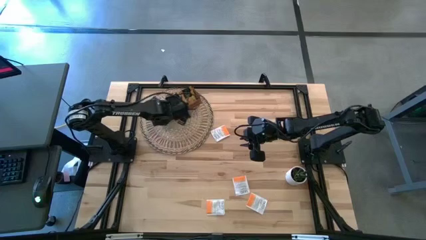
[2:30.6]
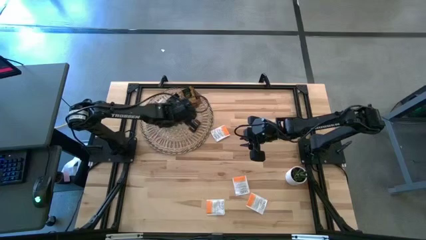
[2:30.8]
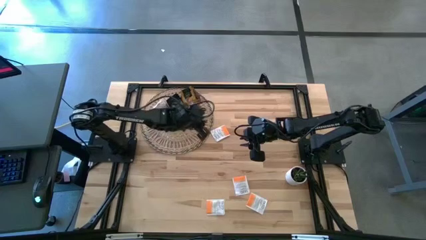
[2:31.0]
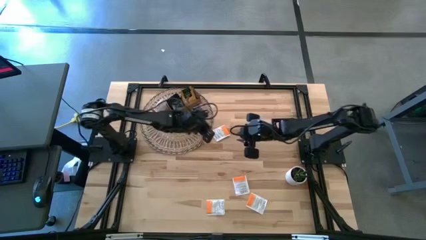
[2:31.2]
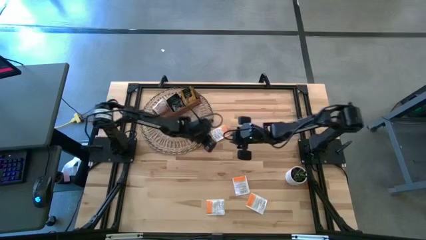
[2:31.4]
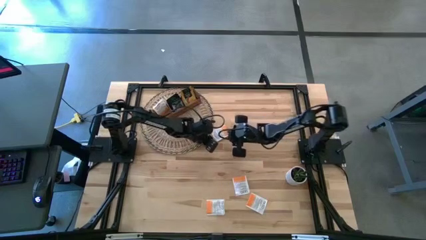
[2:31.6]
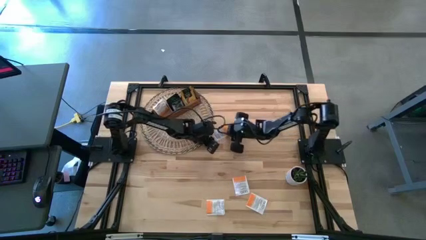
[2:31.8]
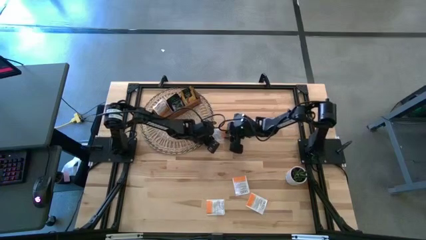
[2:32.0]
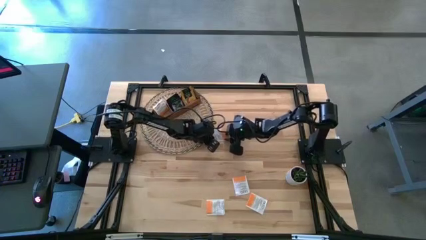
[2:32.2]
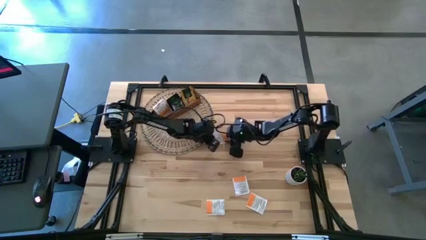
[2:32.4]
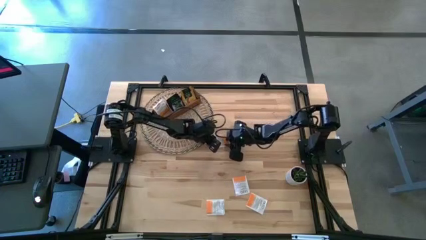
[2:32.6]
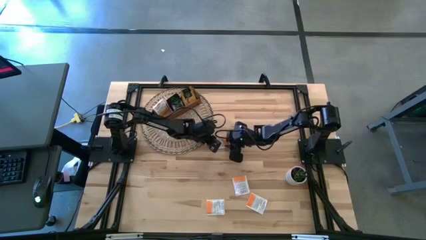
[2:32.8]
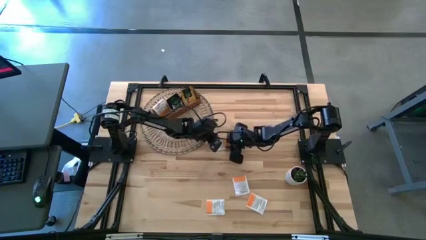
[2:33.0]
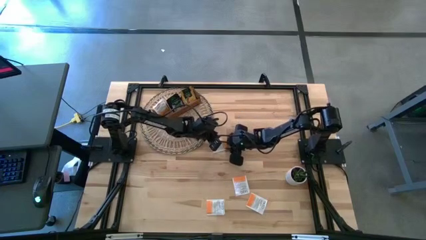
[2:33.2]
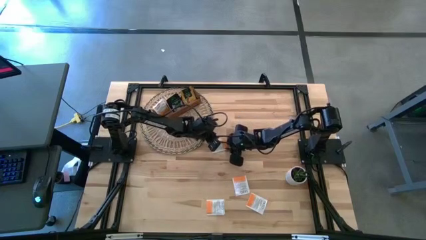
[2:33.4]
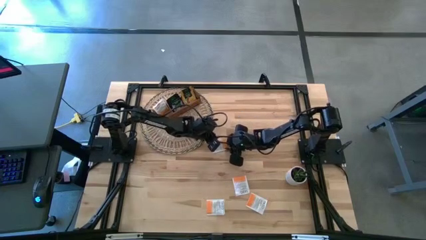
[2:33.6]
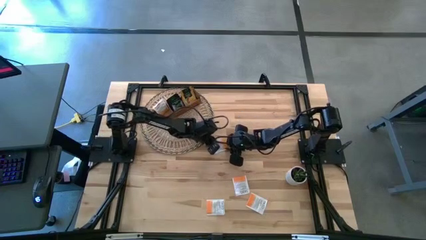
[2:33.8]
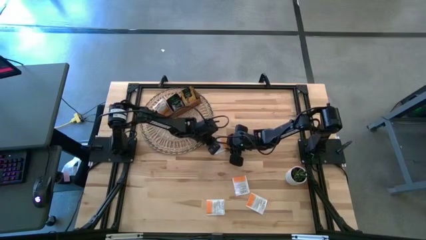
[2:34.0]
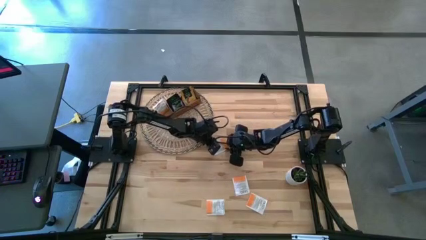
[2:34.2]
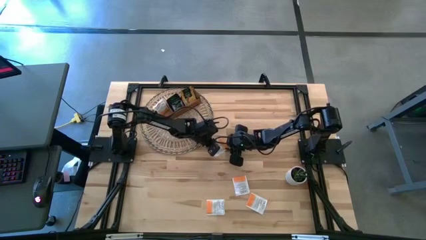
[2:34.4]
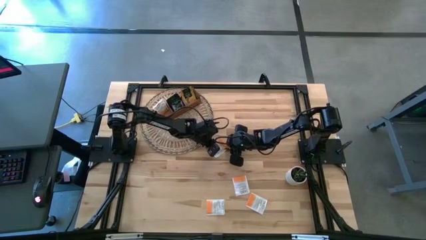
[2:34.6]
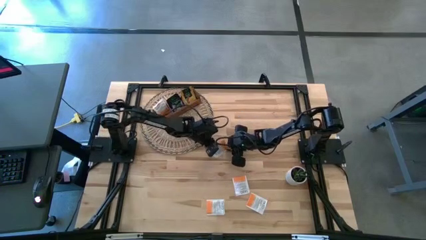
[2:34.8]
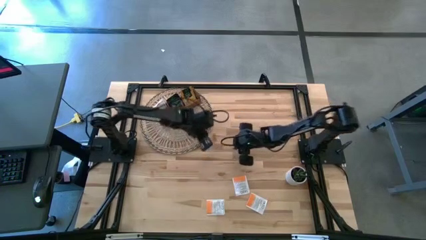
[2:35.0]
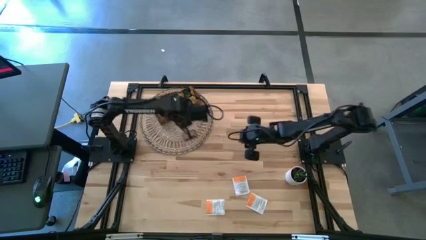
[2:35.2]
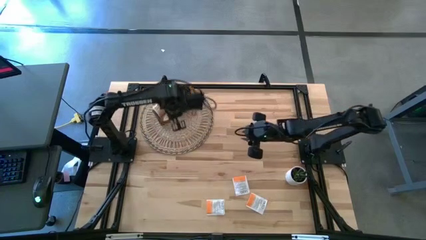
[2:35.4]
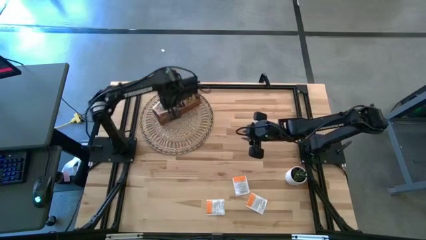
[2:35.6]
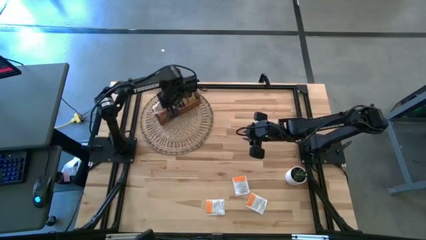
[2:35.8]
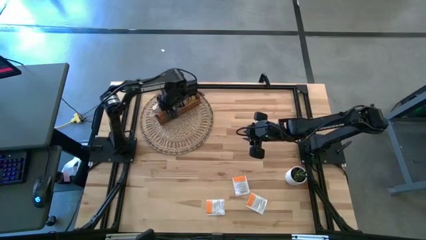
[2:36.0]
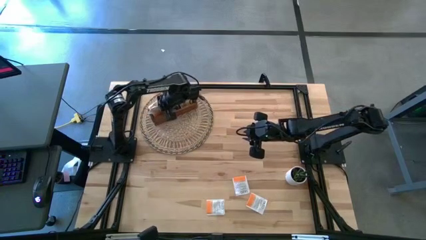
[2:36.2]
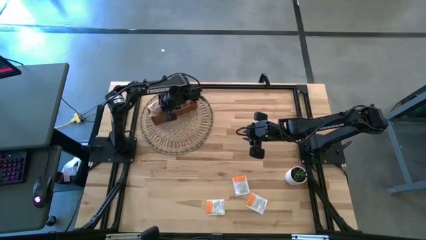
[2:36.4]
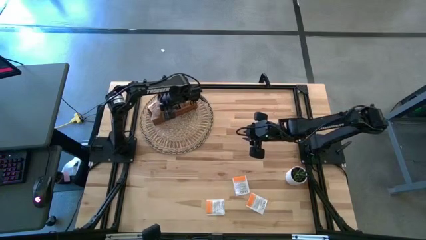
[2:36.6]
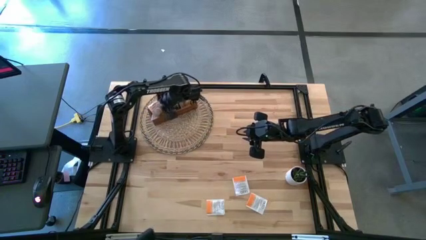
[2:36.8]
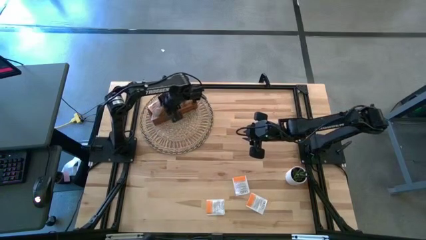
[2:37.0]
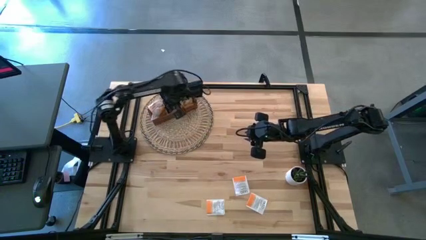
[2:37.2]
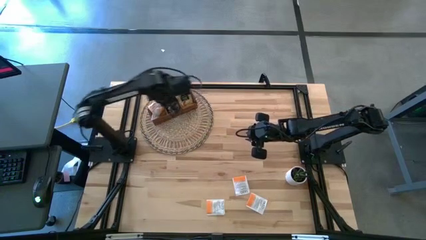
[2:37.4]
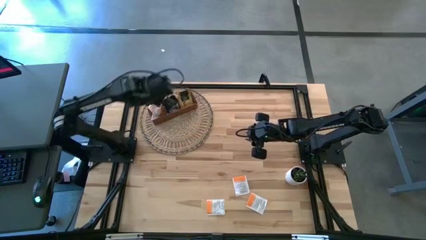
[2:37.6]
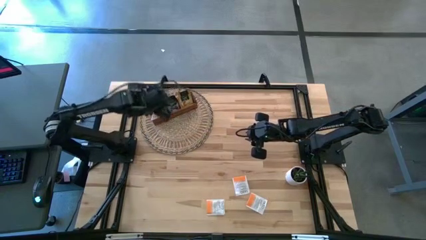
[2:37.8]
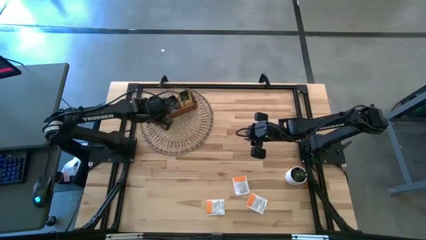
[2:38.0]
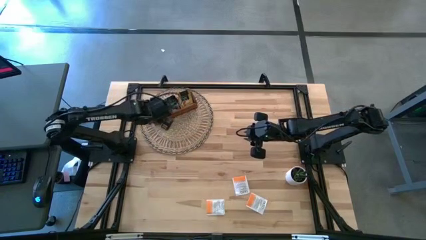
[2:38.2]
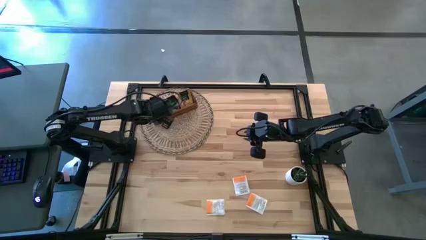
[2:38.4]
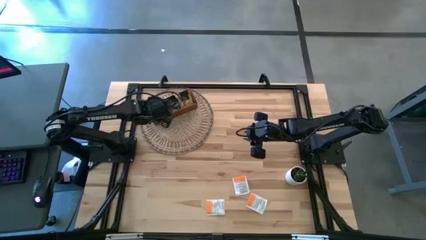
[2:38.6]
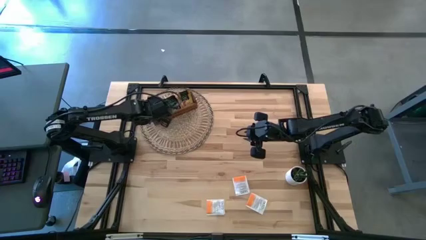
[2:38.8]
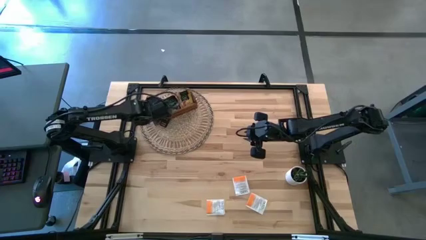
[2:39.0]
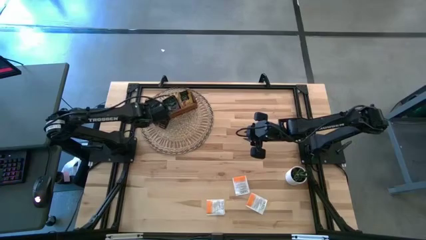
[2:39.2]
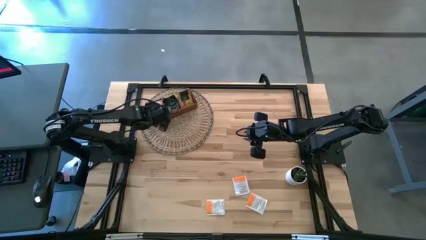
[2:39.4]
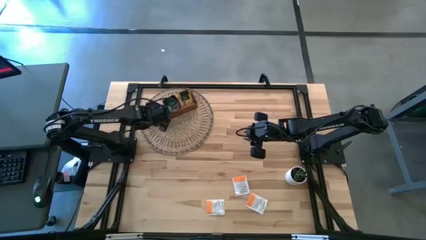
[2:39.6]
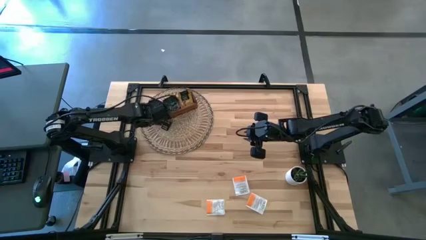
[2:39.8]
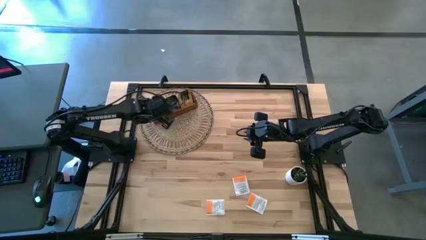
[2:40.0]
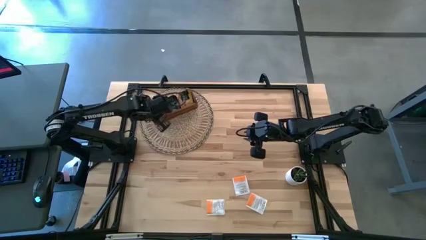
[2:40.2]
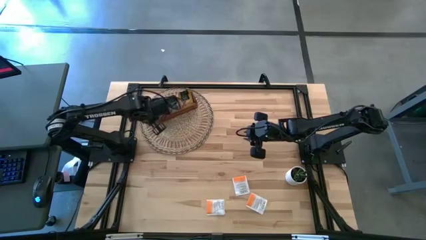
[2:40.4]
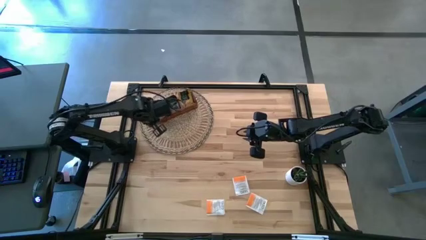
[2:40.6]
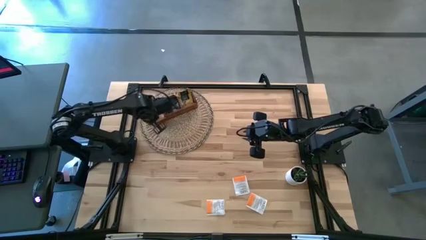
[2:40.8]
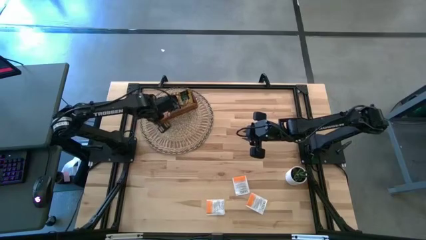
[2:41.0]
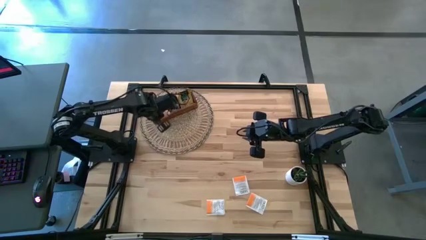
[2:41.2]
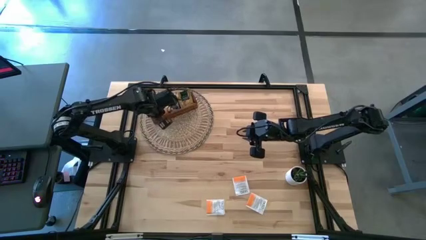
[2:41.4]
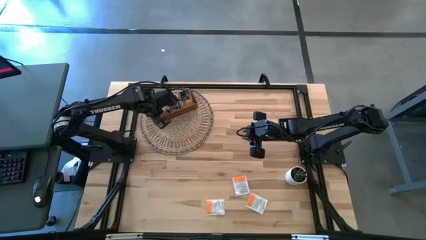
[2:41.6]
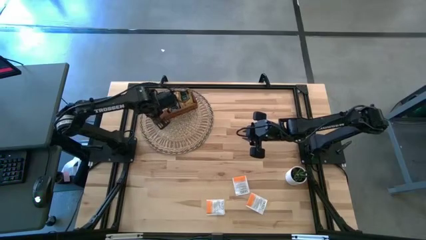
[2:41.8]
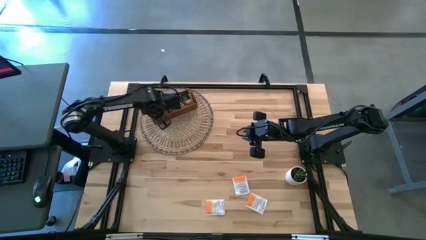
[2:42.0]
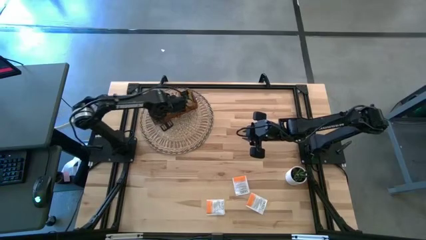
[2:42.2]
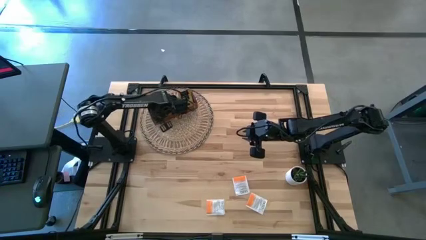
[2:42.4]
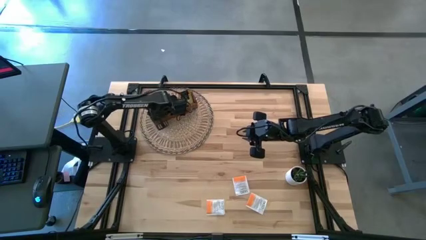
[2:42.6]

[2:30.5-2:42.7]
Task: Pick & Place Tea
Put the orange tea bag into the left section of the wooden organizer

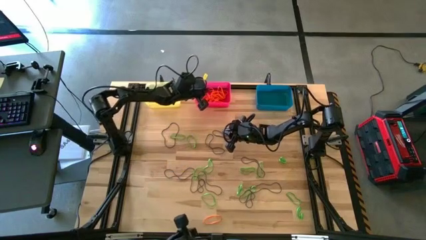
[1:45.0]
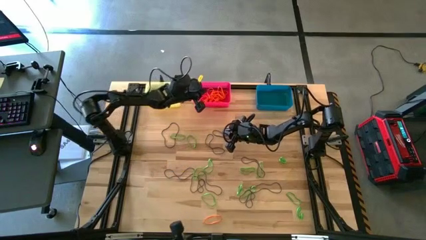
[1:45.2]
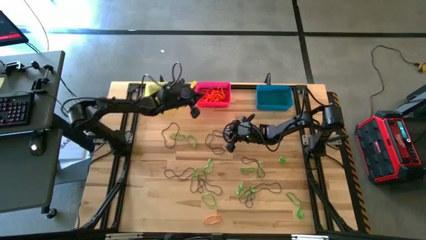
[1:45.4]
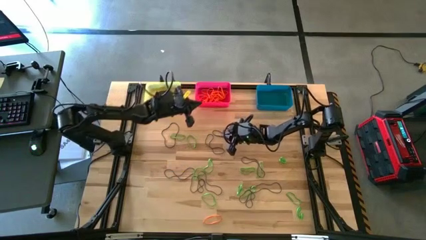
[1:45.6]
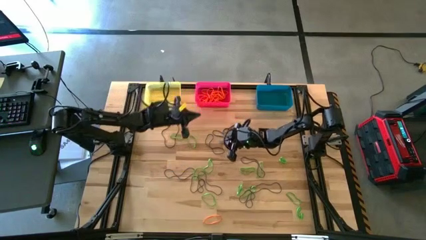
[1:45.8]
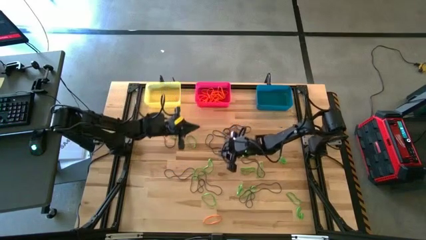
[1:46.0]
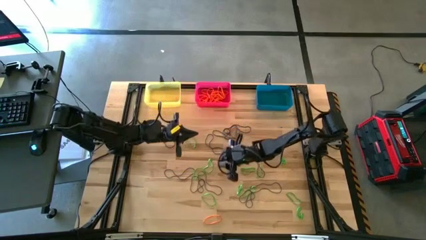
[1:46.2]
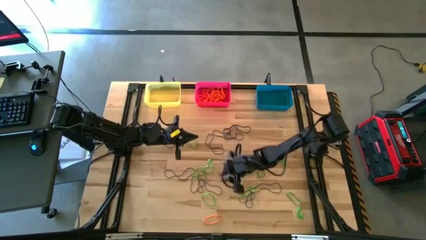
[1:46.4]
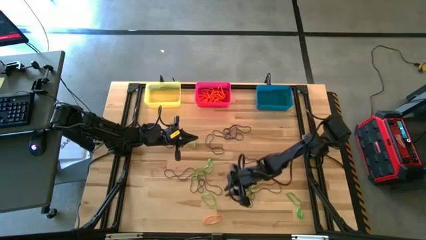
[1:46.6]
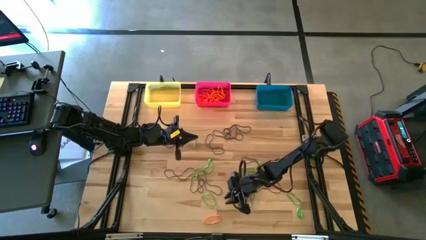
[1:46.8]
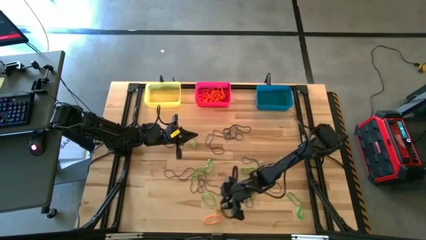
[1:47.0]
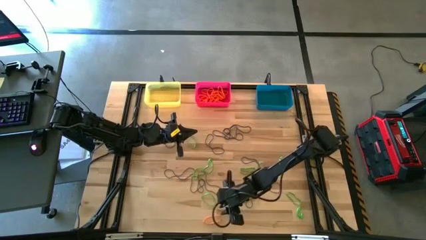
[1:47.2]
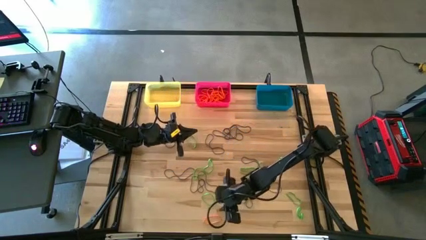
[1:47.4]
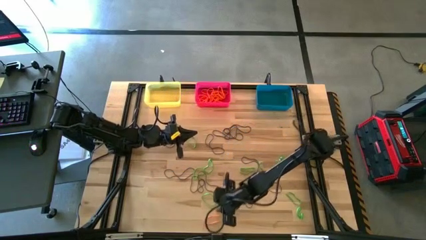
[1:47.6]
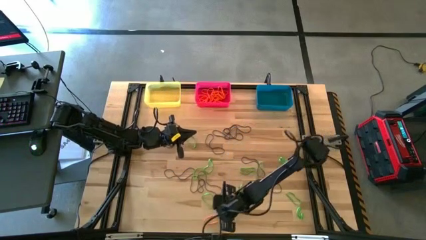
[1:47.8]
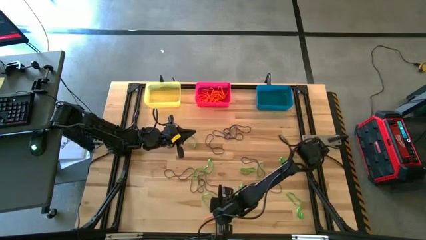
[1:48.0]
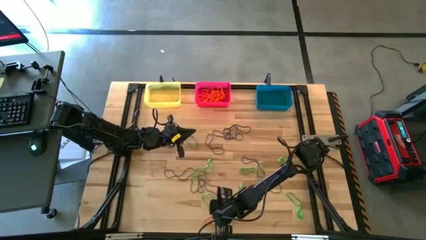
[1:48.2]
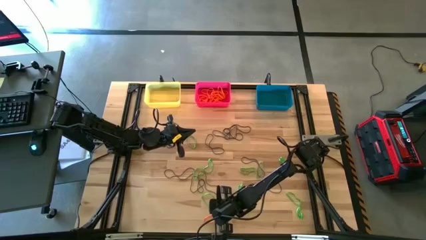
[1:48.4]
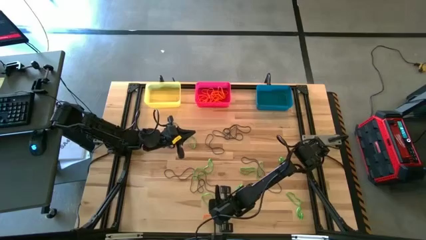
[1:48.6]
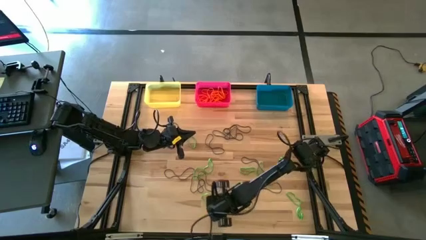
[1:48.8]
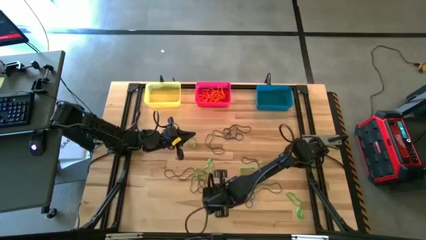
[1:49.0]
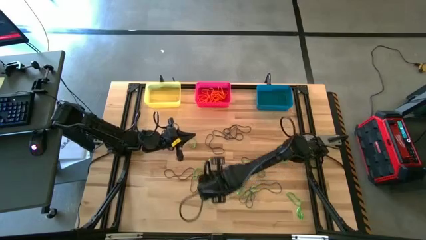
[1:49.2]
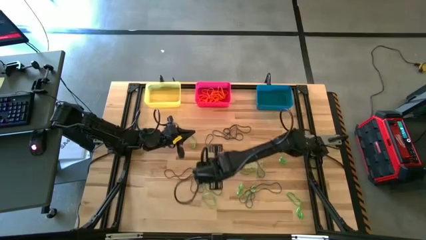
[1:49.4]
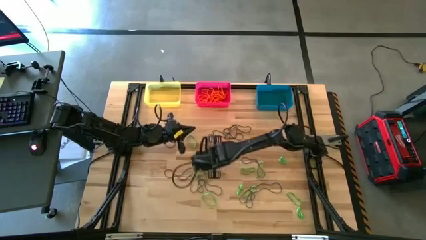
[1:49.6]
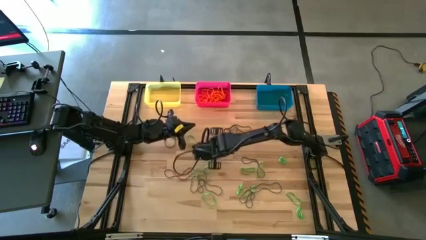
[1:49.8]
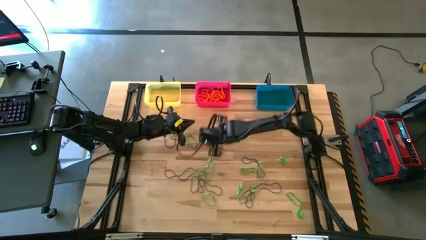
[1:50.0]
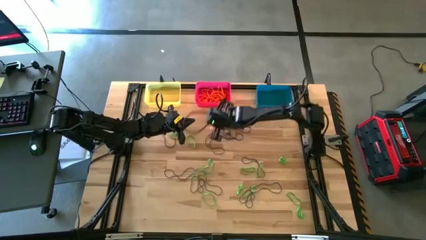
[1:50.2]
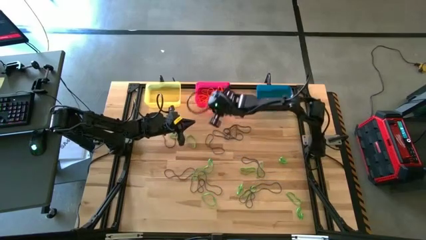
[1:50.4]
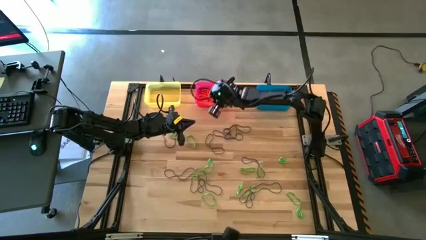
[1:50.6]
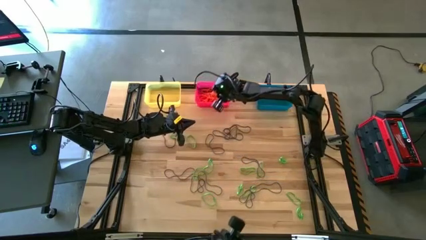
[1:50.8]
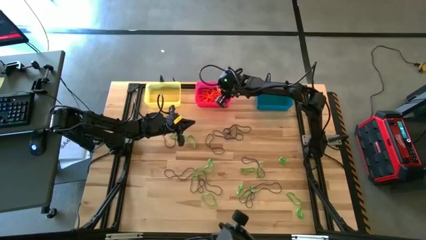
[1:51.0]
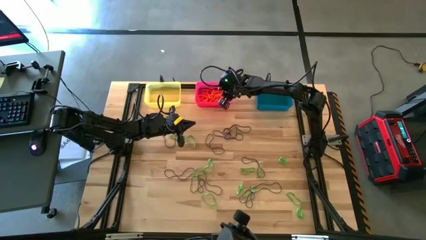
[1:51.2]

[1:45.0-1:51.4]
Task: Sort rubber bands into baskets
Put the orange rubber band into the pink bin
